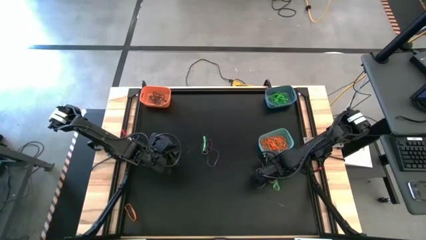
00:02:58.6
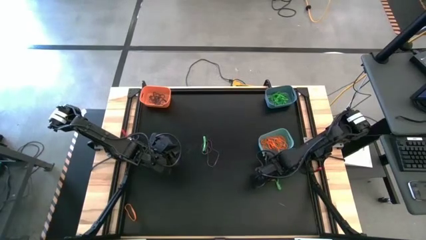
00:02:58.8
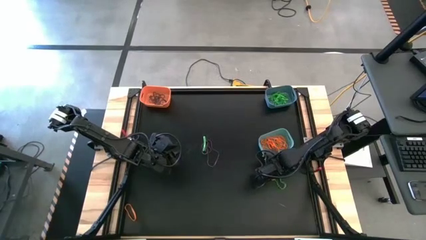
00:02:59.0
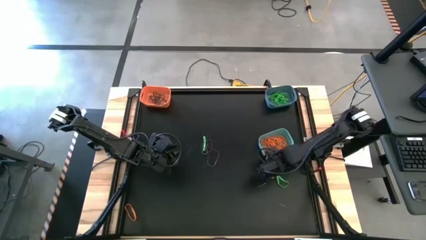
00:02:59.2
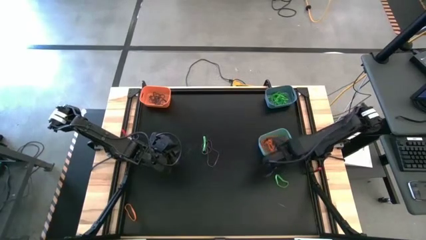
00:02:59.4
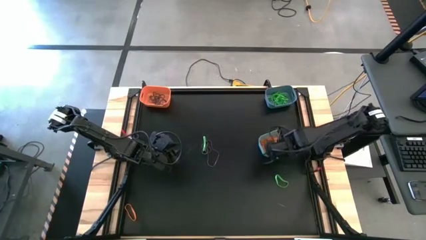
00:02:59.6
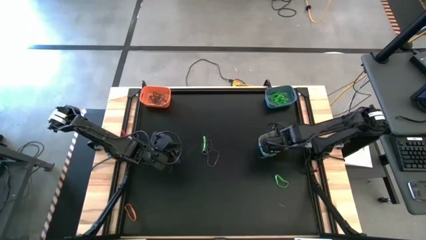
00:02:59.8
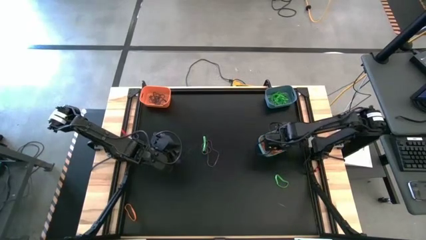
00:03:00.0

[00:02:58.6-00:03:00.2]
Task: Sort rubber bands into baskets
Put the orange rubber band into the green bin

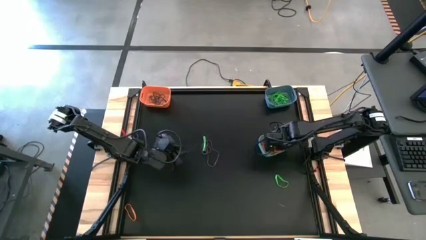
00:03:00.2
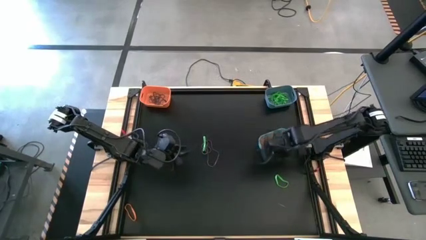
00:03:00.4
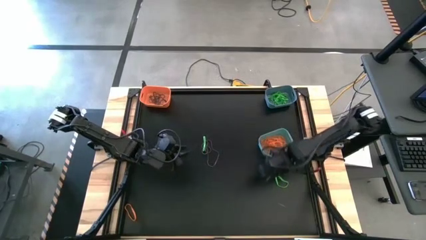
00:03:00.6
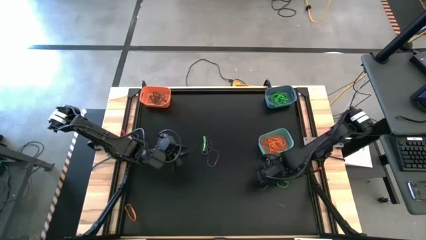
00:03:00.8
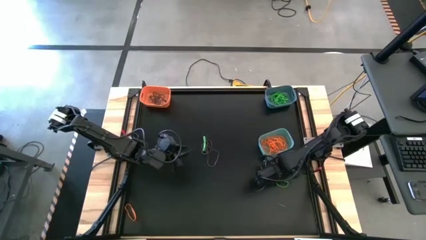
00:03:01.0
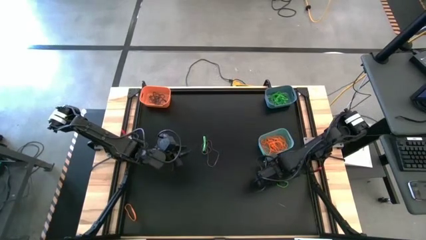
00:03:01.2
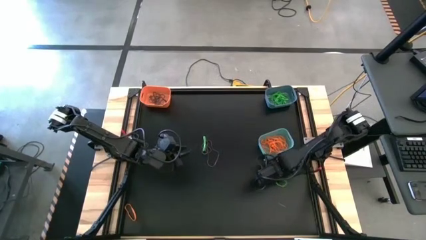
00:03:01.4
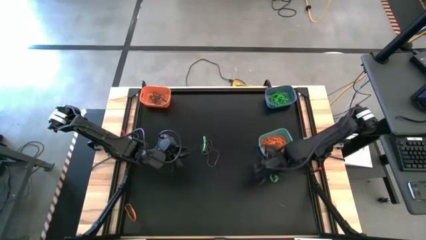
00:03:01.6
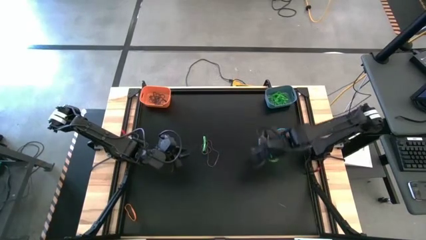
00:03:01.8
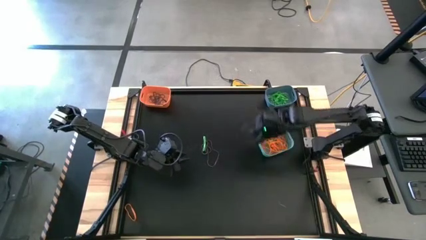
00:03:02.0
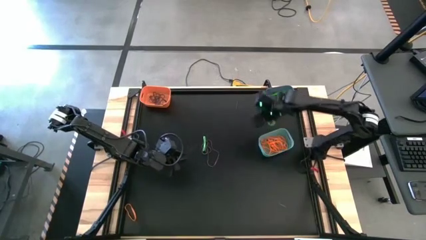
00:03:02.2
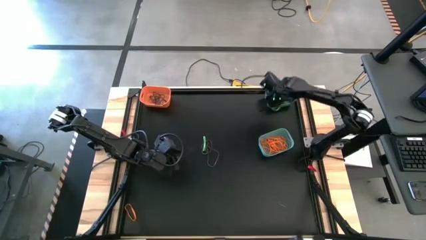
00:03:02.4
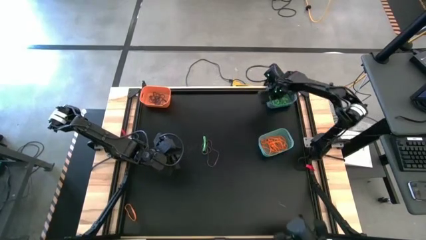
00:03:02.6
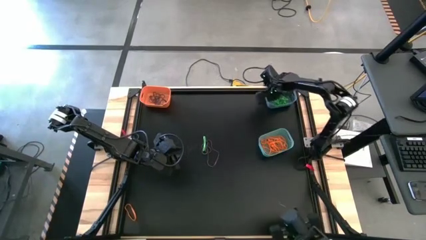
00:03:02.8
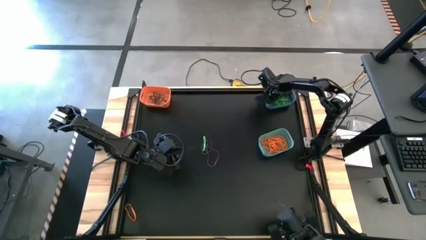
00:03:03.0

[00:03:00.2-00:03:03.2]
Put the green rubber band into the blue bin

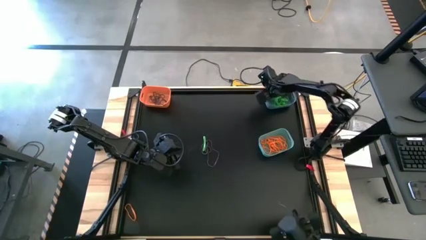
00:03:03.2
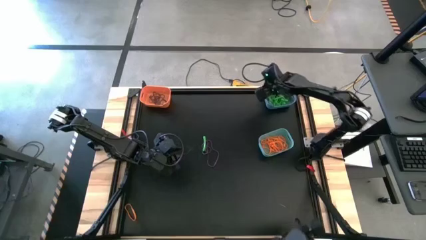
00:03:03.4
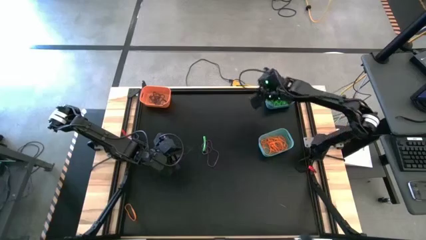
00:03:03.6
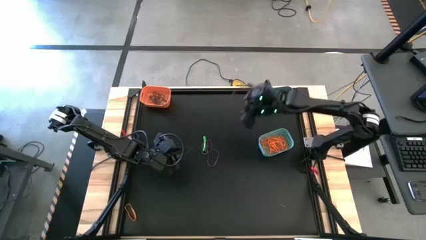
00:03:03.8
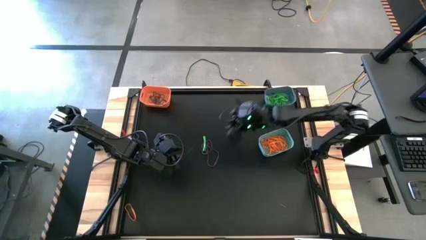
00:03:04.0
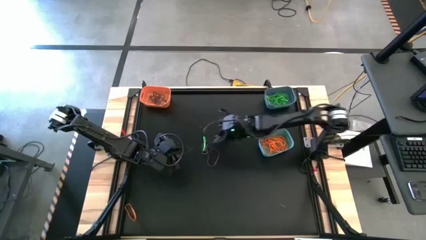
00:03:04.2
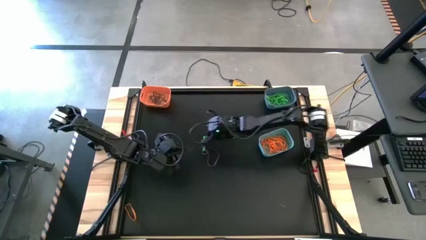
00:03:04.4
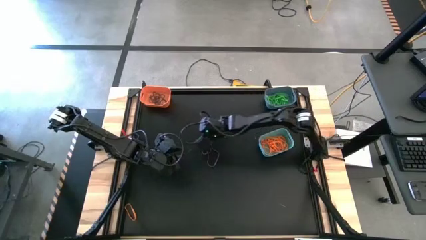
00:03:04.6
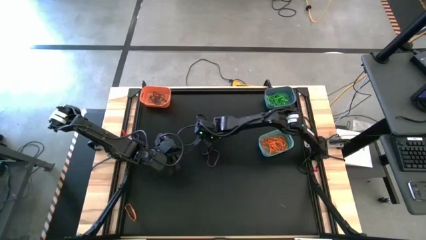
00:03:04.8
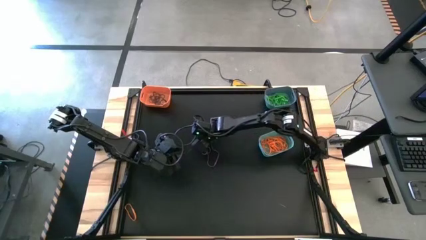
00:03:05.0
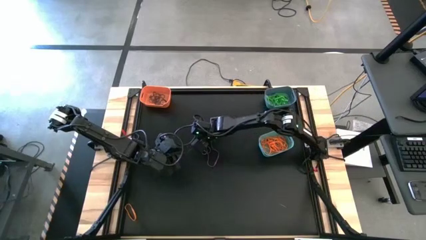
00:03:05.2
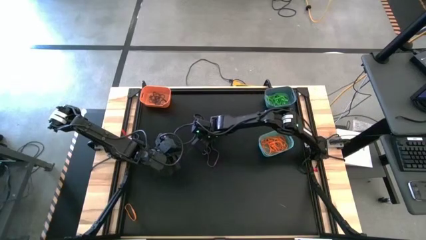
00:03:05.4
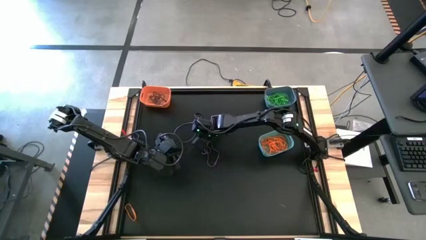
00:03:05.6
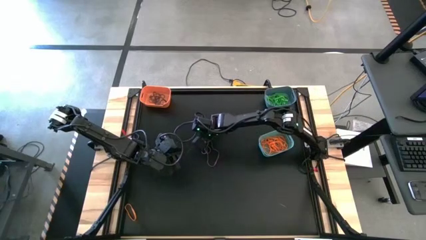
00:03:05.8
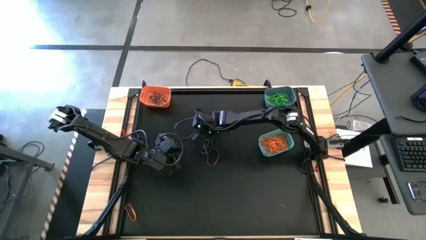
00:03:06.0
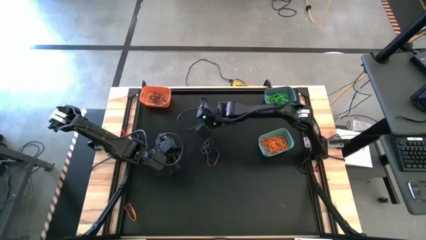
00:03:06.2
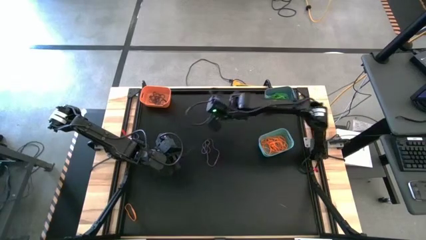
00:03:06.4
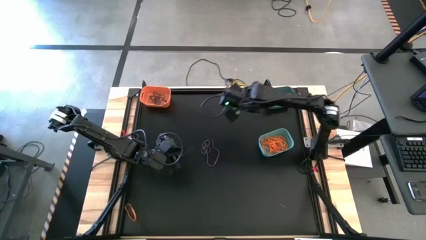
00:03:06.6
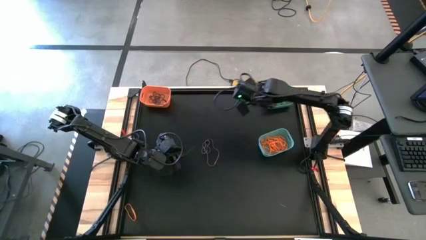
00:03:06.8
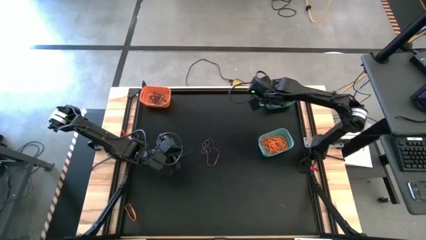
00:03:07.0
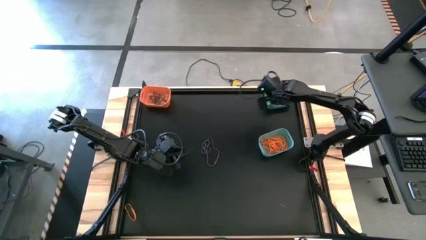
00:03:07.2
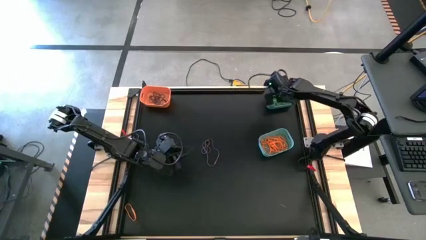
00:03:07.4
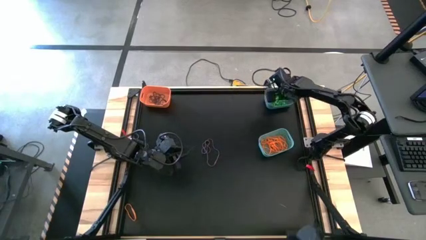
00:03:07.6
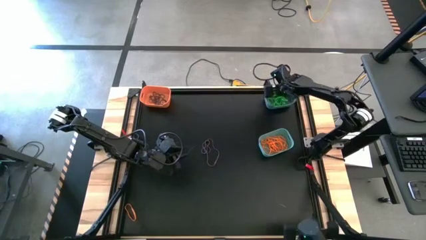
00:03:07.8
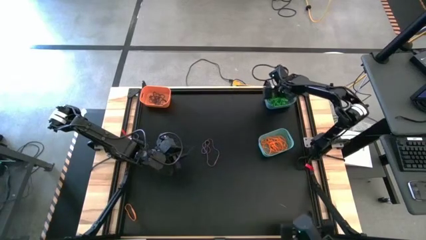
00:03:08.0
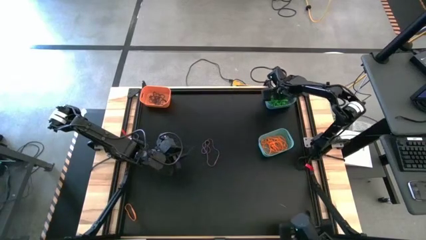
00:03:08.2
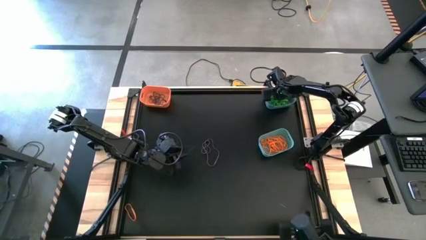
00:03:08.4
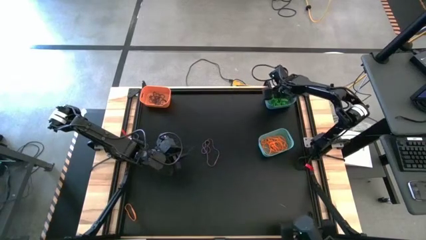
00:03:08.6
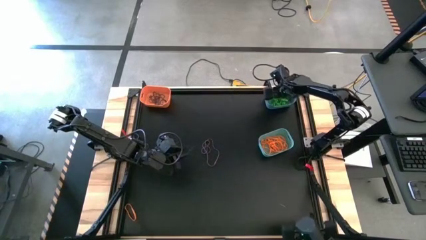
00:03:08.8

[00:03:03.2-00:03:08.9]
Put the green rubber band into the blue bin

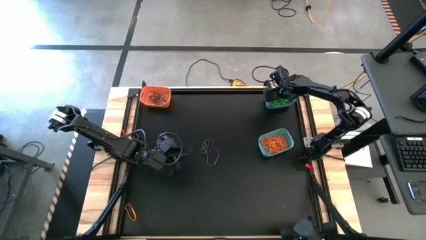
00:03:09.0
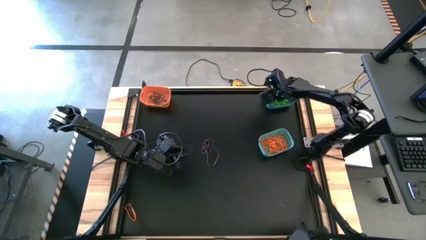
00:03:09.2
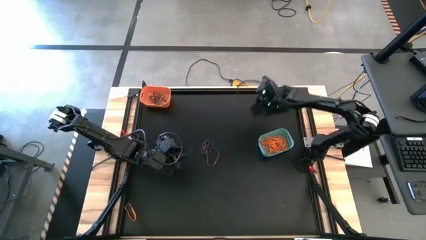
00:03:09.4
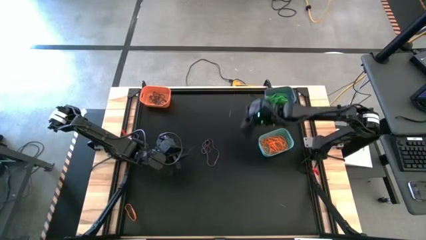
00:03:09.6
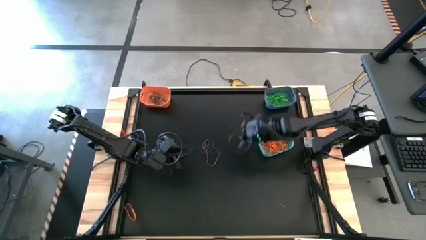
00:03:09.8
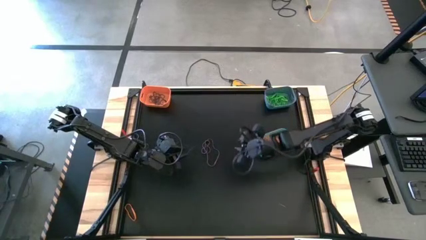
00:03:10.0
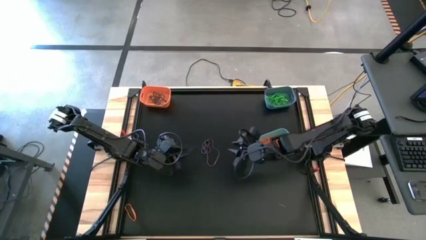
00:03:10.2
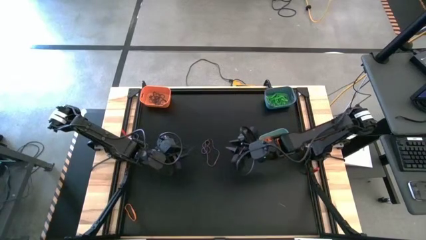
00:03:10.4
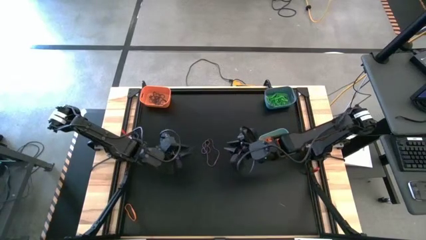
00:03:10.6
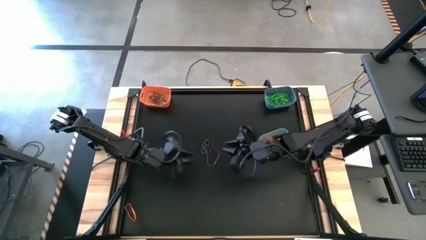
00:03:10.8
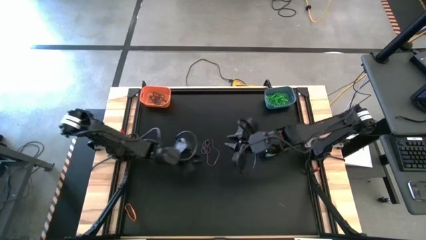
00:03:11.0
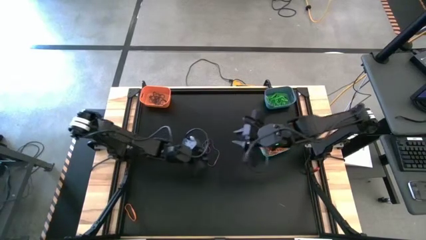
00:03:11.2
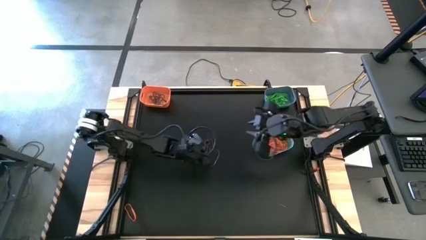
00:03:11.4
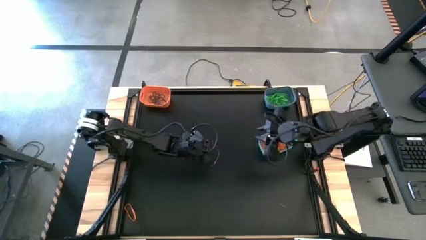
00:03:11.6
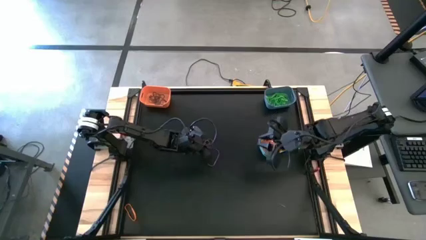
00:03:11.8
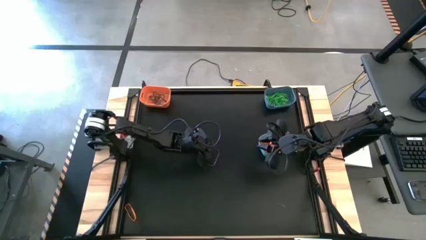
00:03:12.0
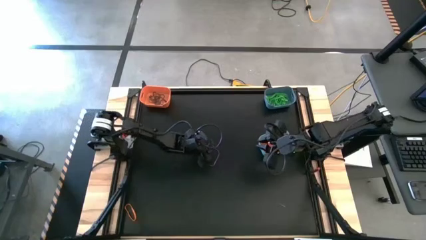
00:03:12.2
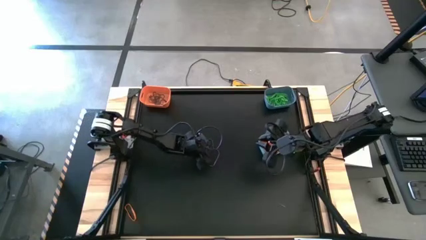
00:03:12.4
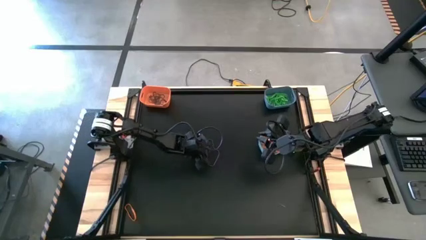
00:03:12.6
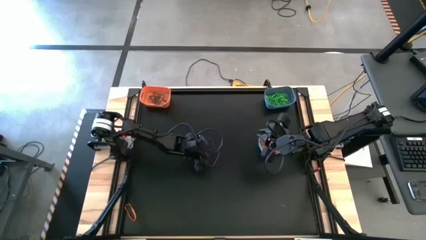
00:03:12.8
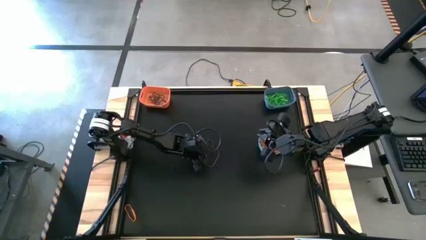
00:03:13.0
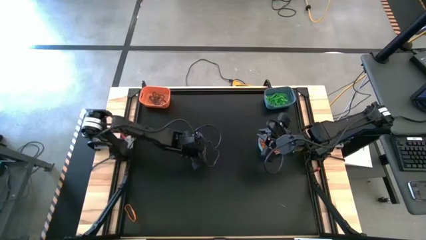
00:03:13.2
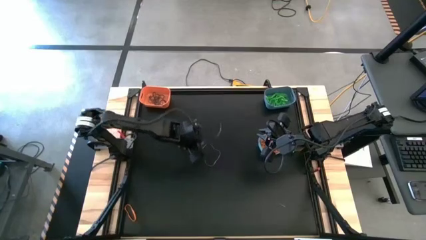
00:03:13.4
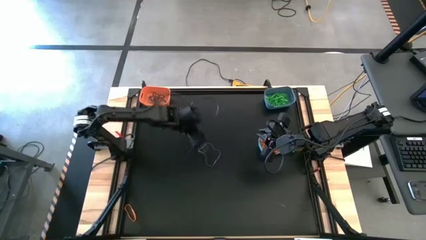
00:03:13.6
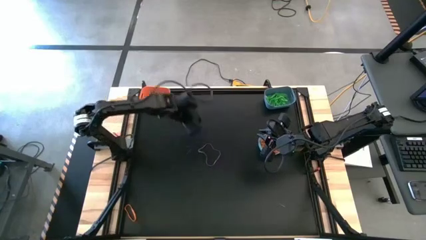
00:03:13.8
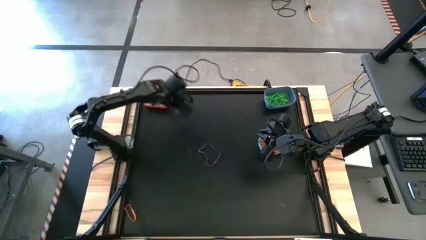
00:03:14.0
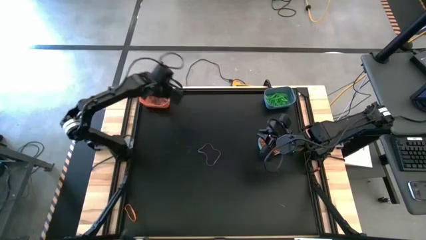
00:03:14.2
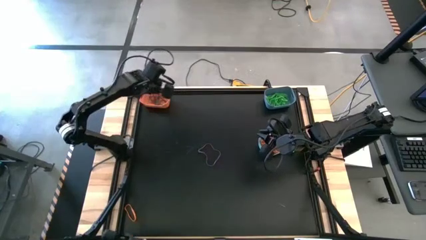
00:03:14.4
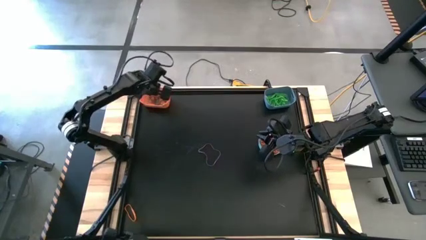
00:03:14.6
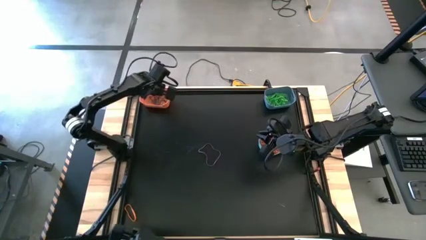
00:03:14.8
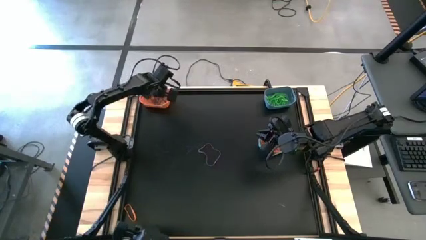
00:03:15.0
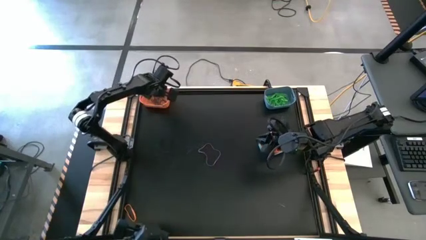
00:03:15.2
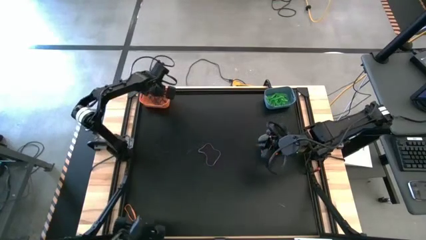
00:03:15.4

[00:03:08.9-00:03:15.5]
Put the purple rubber band into the orange bin
